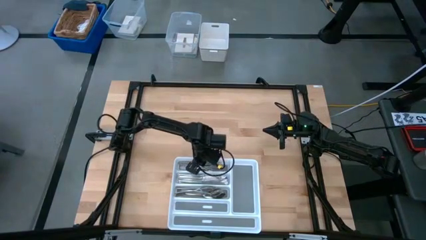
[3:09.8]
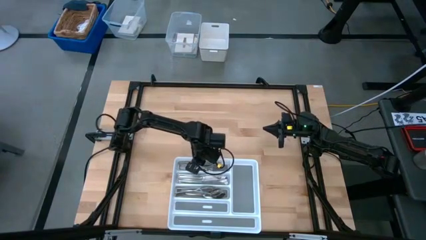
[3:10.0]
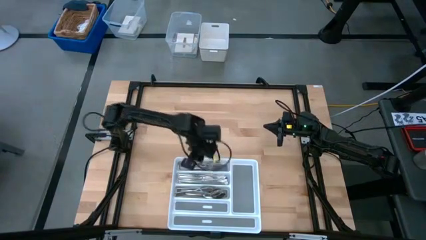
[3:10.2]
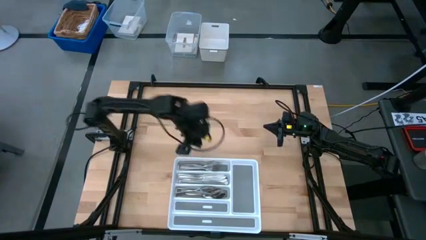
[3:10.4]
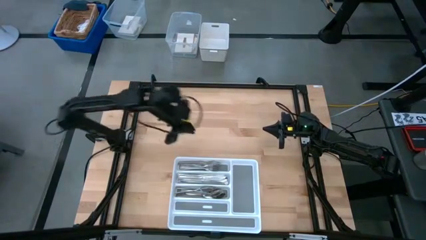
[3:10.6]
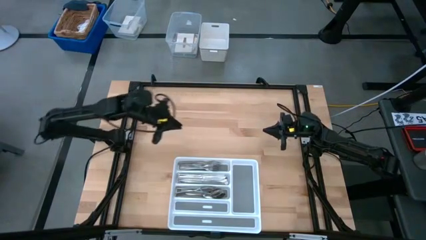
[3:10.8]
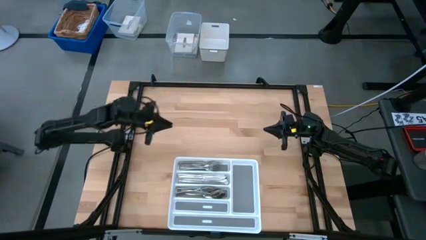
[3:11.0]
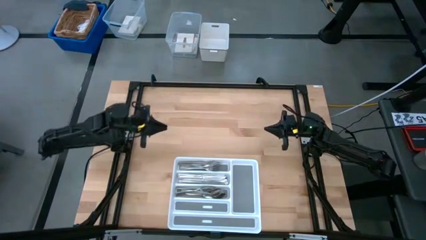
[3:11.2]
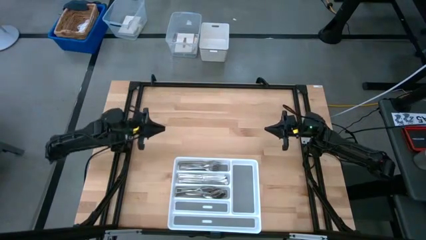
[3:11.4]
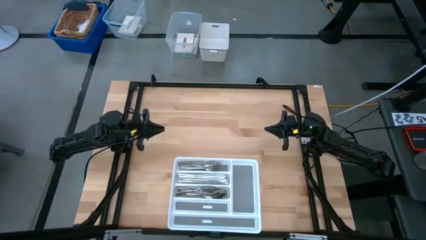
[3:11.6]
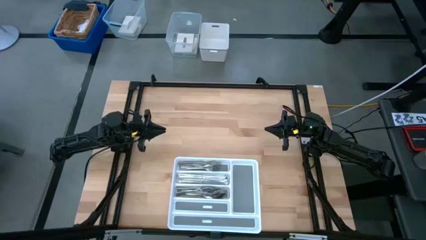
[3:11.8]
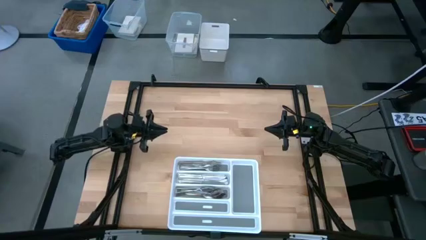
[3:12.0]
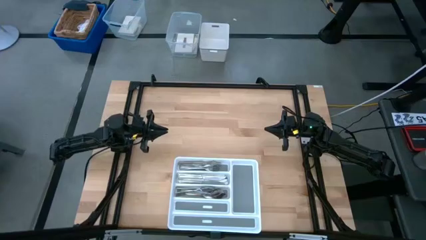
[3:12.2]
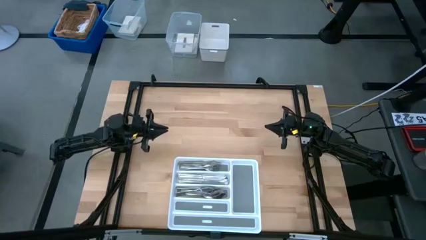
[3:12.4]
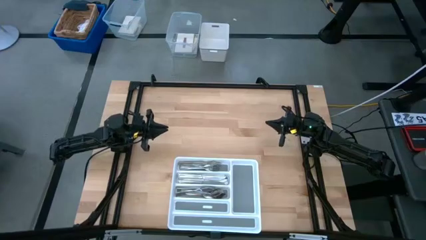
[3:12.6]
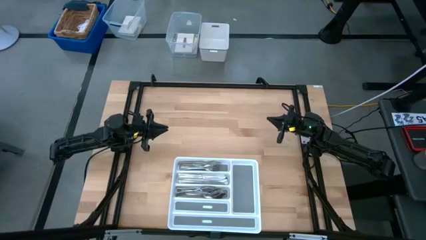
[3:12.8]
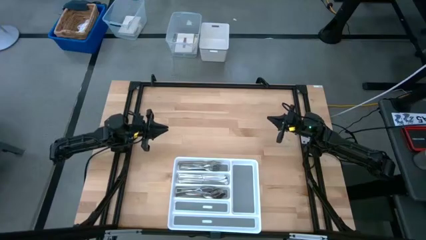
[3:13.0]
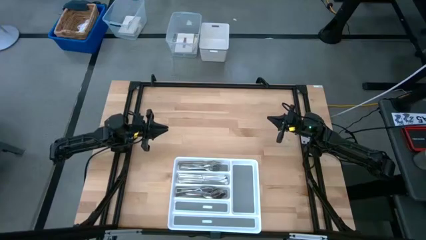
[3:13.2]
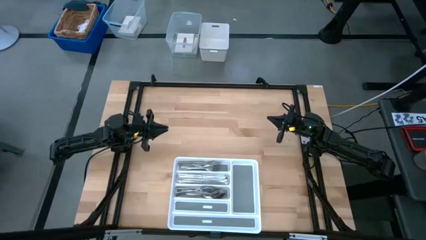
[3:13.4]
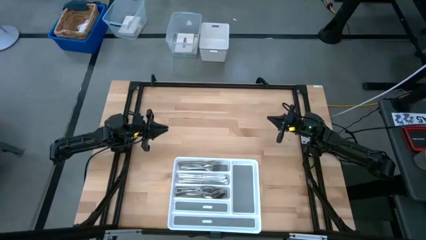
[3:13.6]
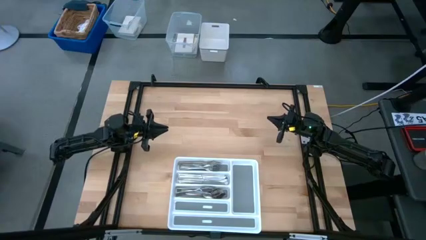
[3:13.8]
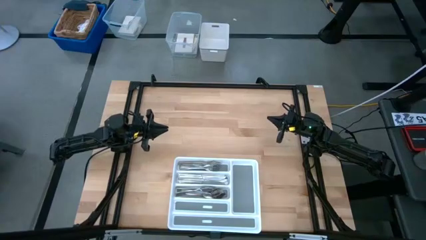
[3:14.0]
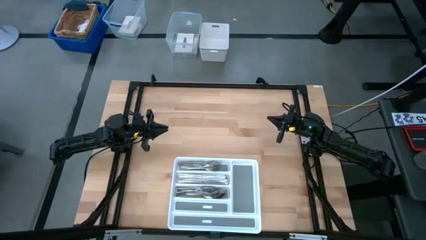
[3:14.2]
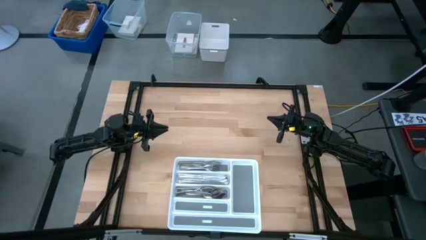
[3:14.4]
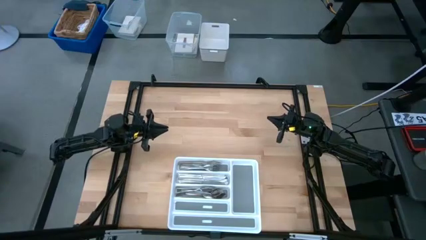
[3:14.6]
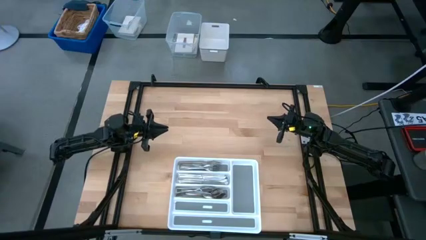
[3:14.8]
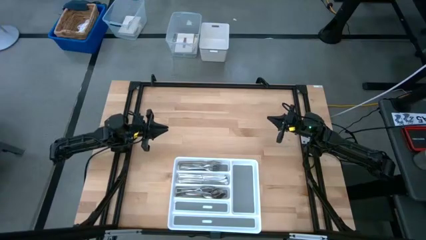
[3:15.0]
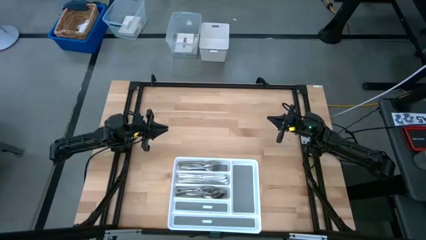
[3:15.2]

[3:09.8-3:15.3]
Task: Sort silverware
Return to Home Position

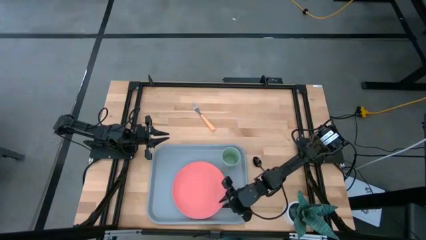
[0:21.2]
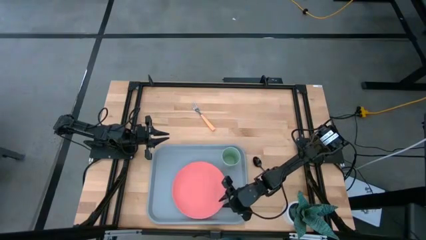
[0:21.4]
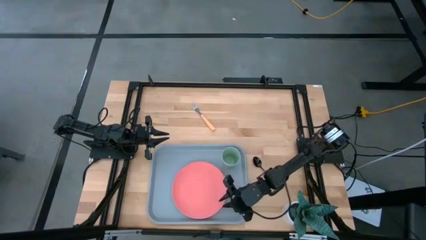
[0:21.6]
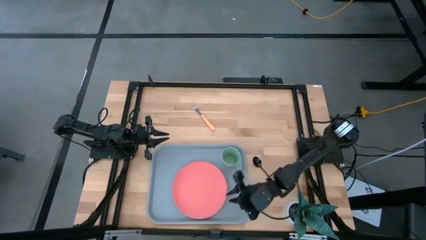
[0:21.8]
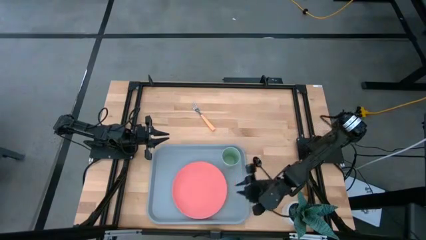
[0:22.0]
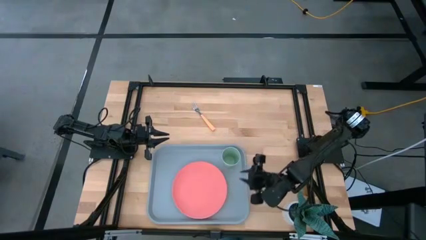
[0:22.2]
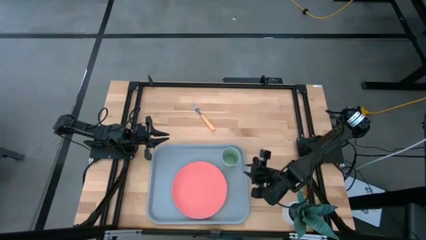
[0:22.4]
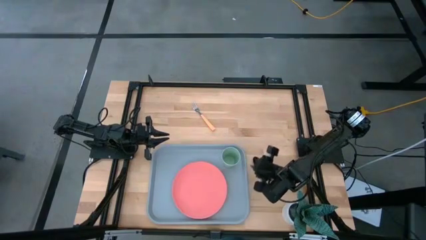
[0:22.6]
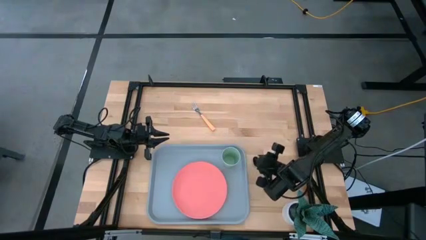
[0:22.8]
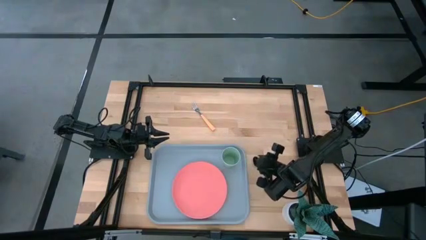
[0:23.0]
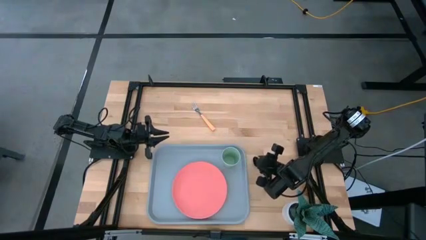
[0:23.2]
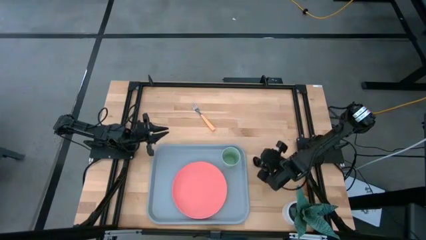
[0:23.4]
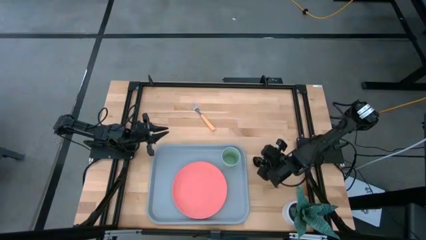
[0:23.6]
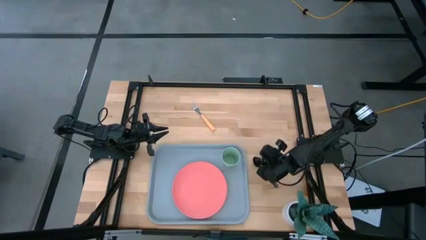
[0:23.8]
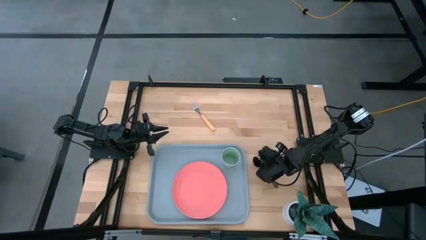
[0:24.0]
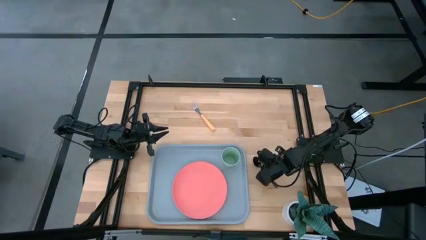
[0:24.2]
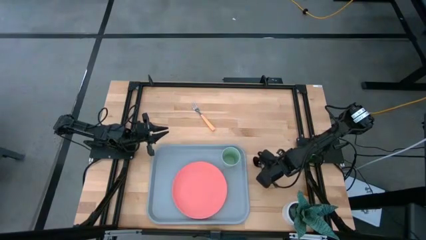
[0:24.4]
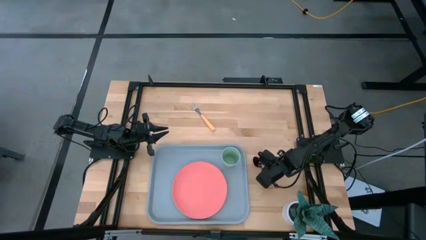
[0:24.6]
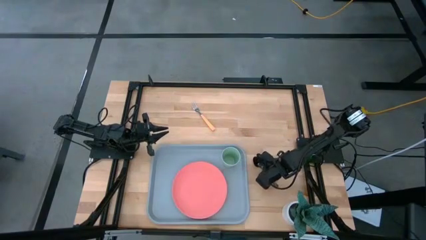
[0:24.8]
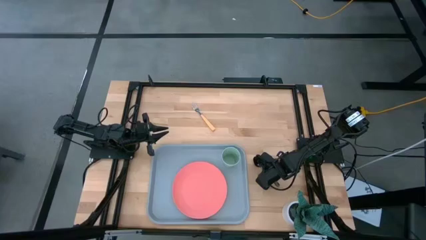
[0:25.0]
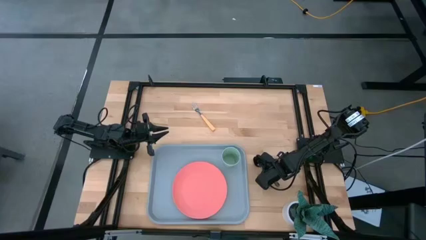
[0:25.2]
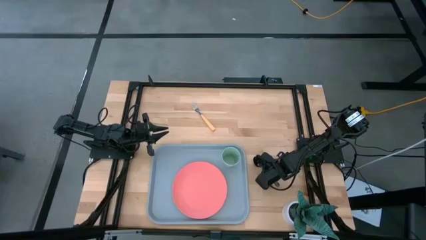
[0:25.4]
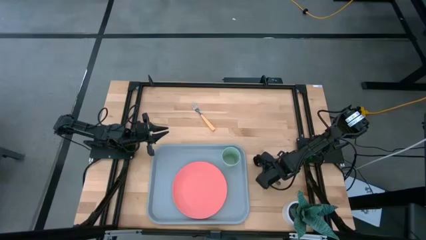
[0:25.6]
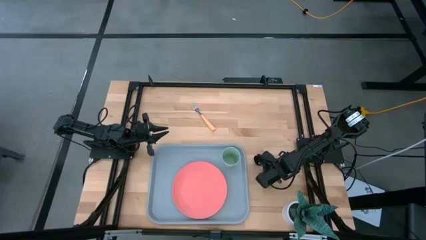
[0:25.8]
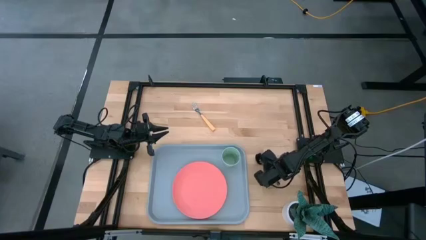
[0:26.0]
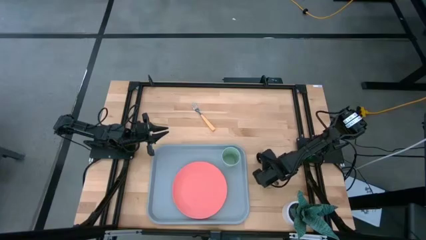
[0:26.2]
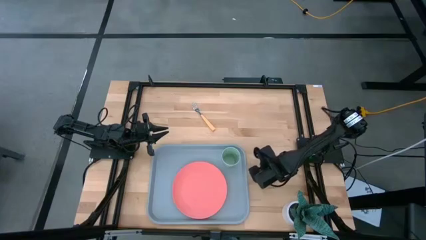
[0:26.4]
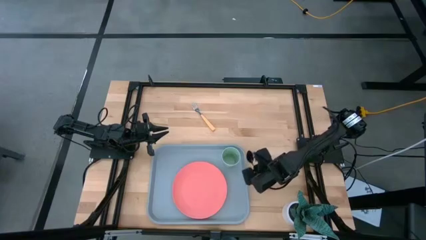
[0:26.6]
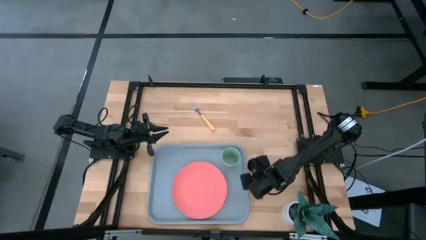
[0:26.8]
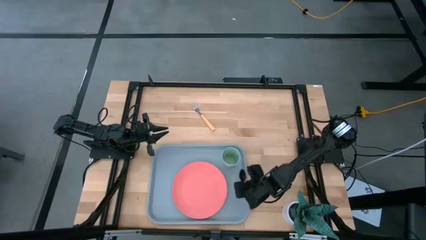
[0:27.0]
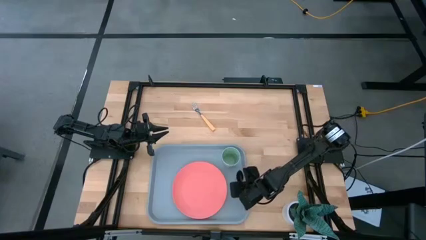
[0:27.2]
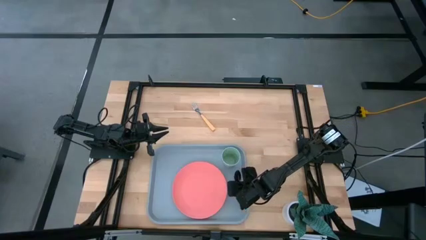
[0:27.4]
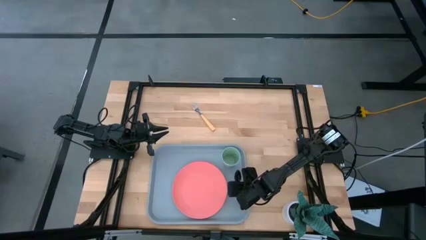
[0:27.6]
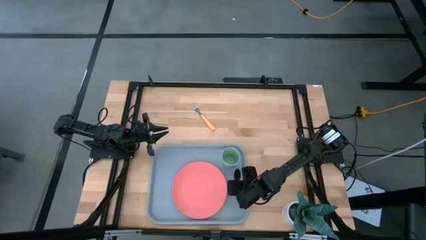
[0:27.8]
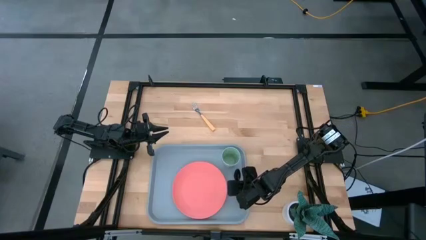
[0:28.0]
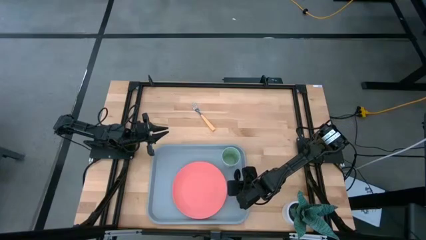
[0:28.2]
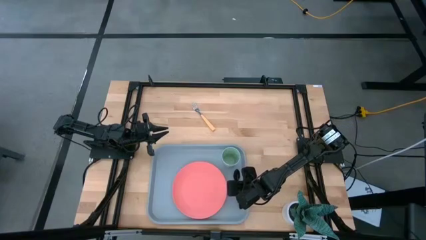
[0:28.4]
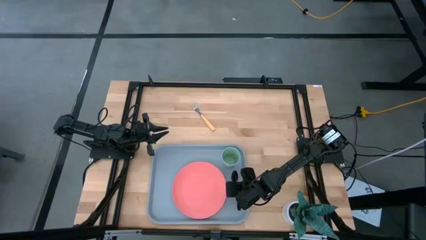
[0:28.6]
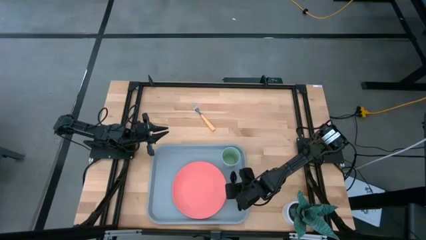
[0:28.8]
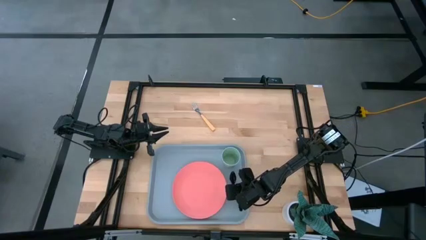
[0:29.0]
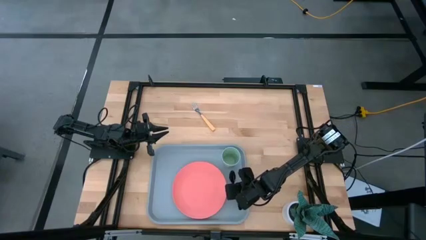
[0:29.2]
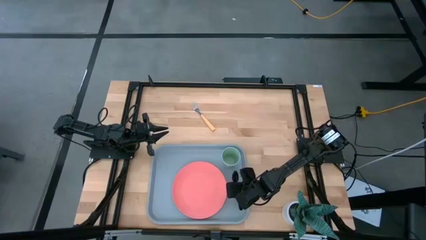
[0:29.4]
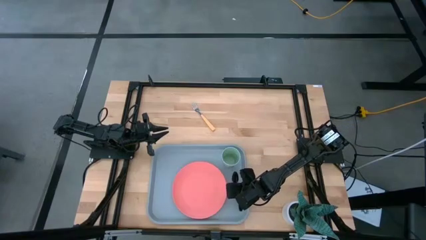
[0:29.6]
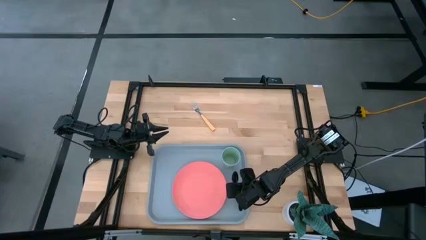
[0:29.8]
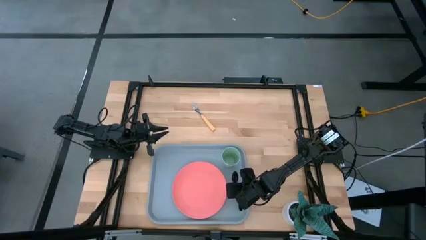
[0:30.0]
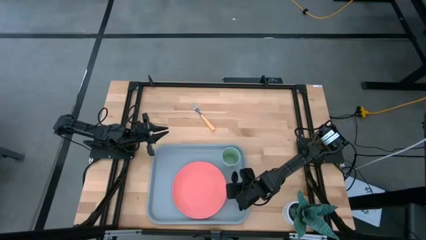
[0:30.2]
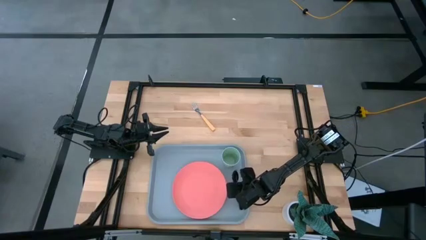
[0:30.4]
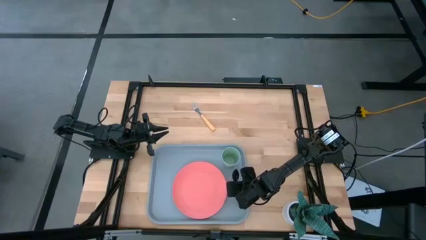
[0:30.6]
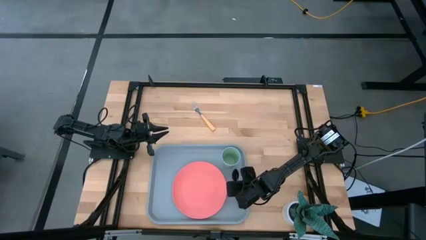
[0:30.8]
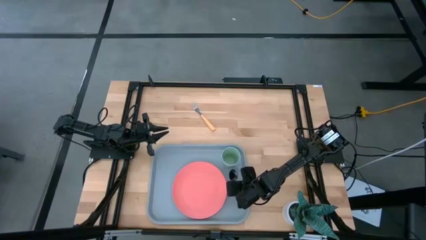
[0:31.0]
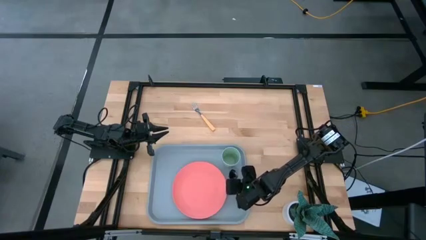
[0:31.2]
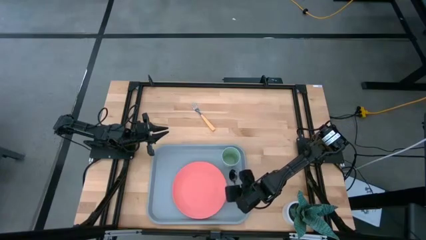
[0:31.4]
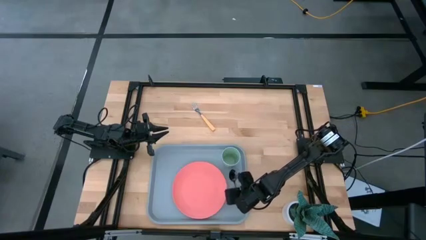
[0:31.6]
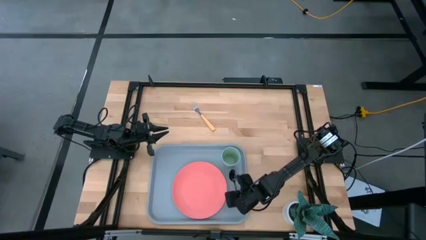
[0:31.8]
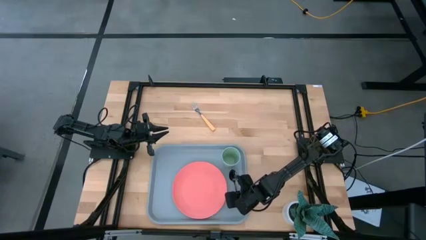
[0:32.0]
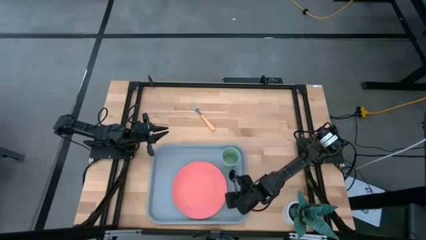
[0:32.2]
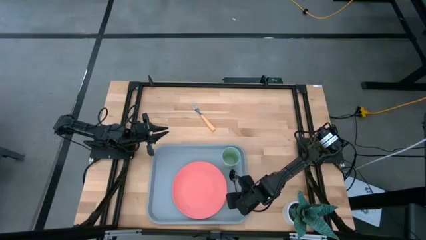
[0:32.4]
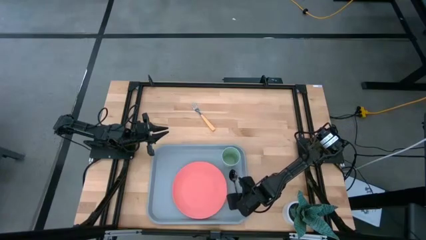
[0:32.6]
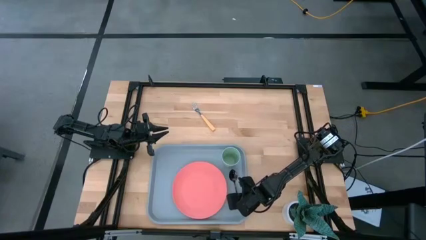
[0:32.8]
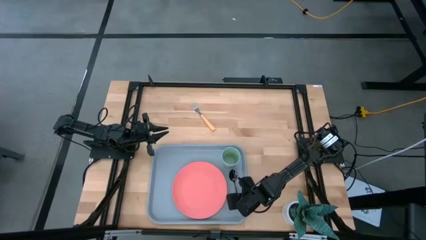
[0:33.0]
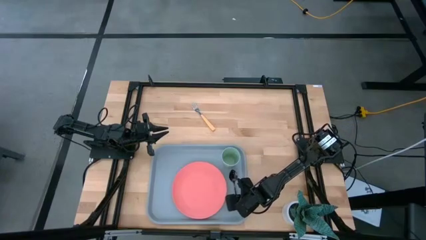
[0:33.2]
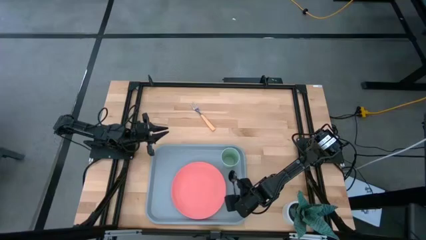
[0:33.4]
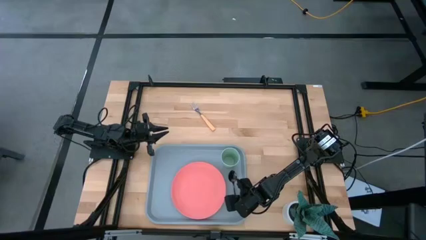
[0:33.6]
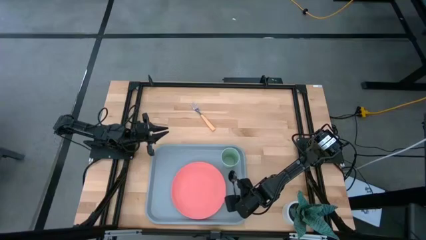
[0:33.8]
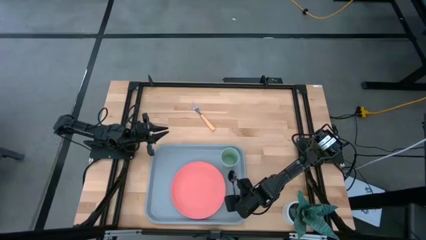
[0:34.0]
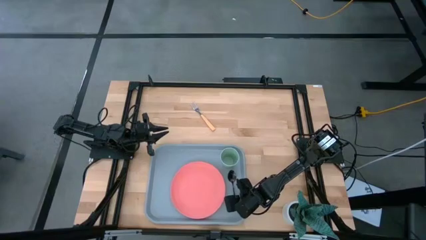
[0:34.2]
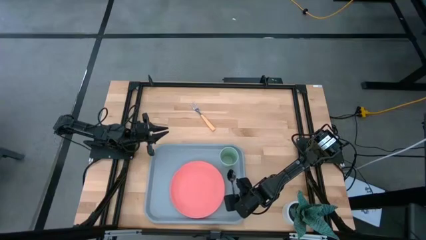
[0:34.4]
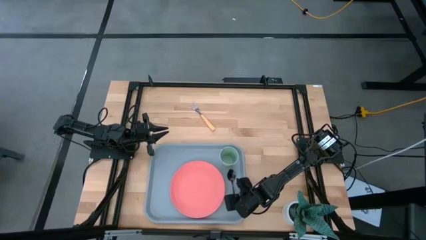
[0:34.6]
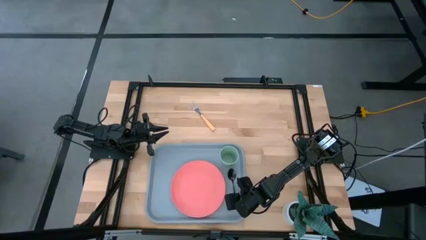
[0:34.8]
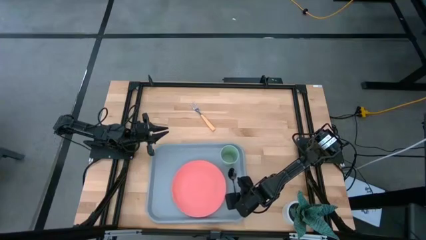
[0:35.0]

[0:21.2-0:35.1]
Task: Pick and place plate/cup/fork/spoon on tray
Put the black spoon on the gray serving tray to the right of the pink plate
